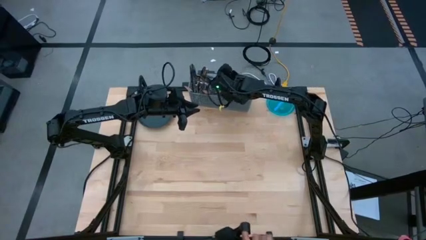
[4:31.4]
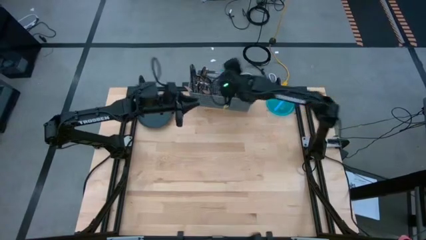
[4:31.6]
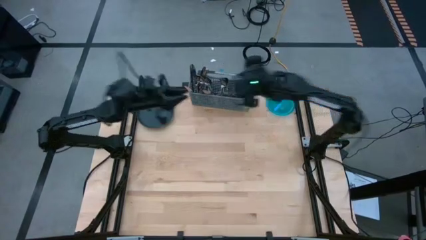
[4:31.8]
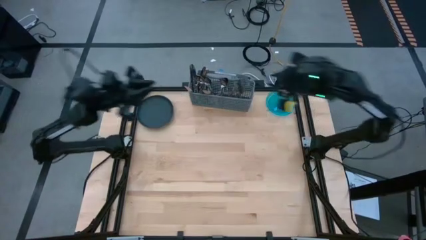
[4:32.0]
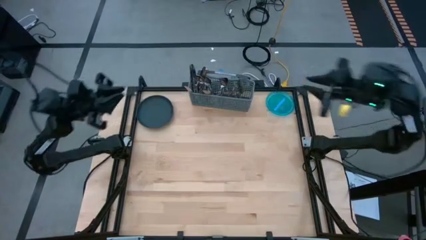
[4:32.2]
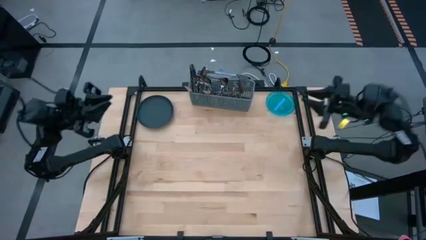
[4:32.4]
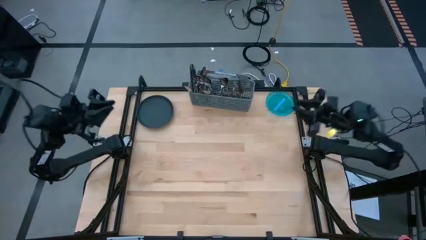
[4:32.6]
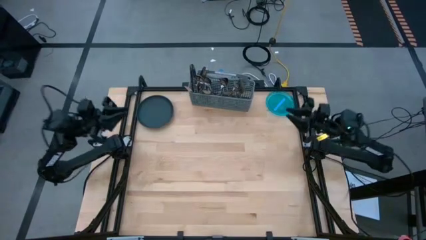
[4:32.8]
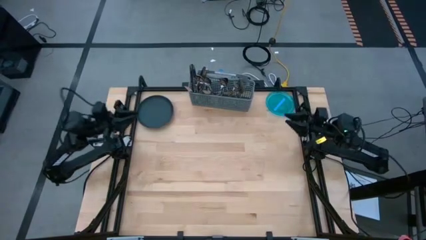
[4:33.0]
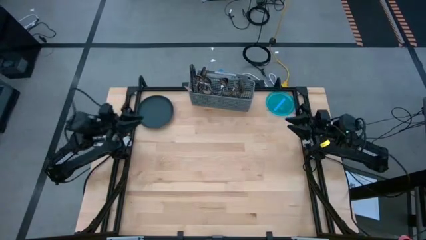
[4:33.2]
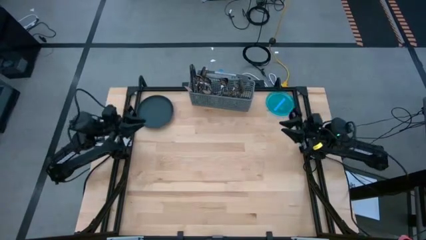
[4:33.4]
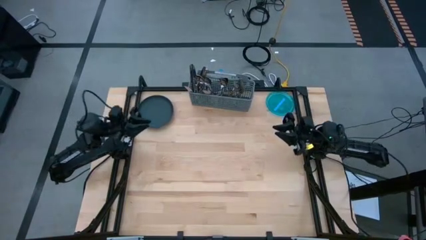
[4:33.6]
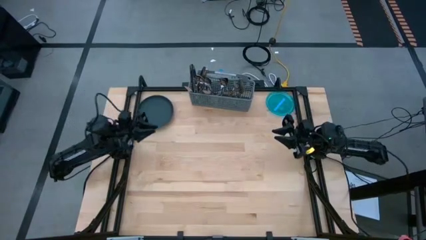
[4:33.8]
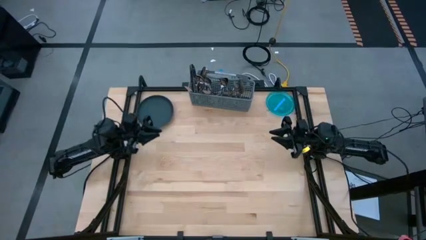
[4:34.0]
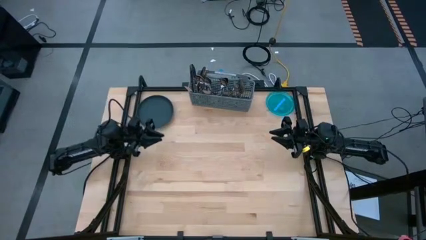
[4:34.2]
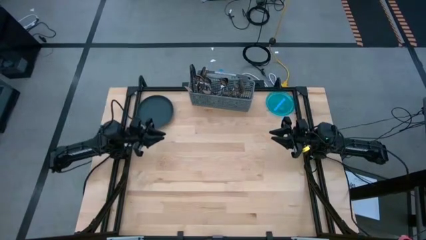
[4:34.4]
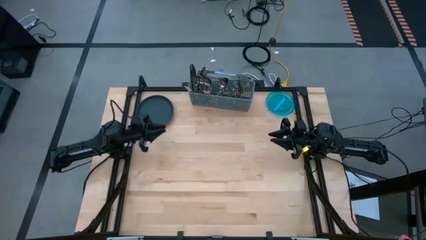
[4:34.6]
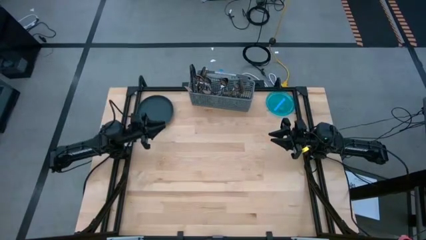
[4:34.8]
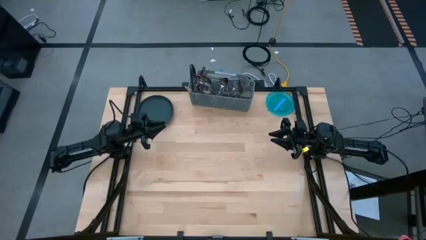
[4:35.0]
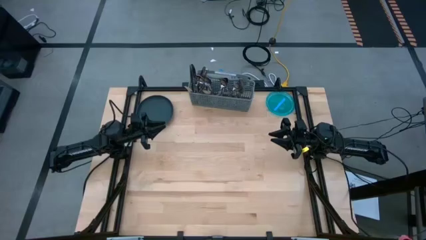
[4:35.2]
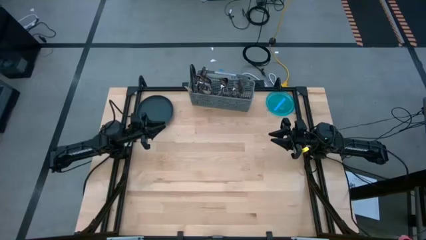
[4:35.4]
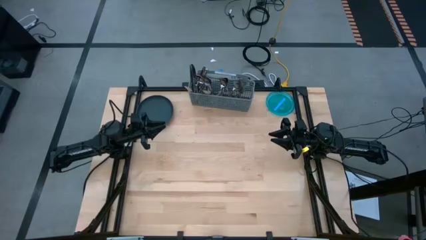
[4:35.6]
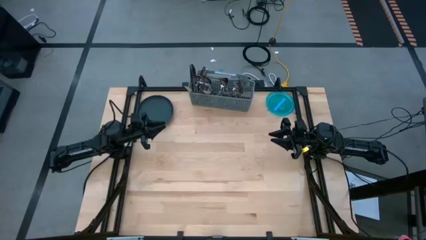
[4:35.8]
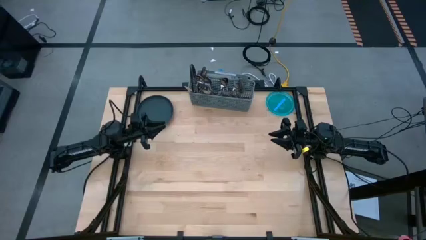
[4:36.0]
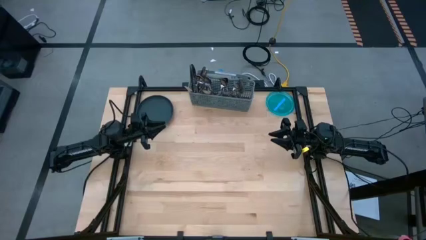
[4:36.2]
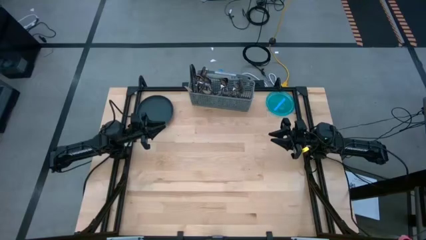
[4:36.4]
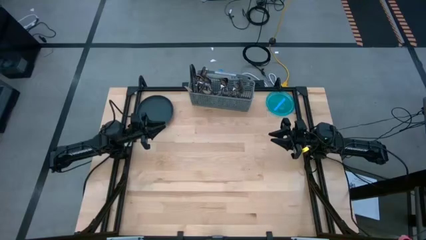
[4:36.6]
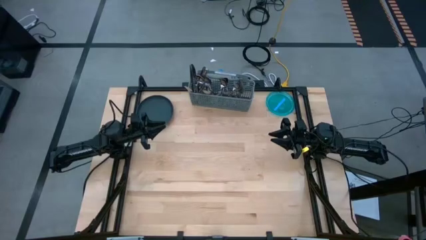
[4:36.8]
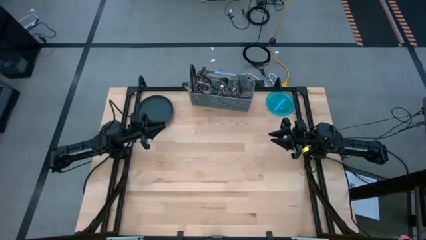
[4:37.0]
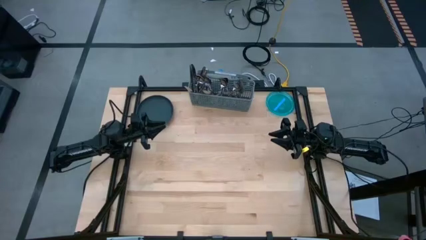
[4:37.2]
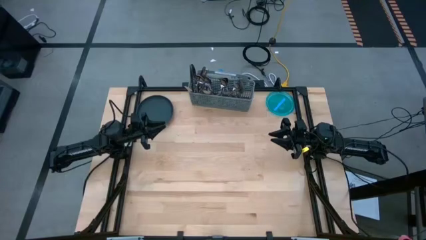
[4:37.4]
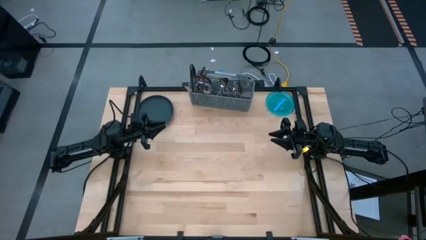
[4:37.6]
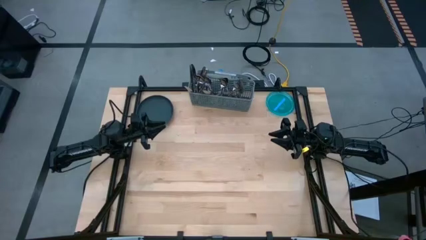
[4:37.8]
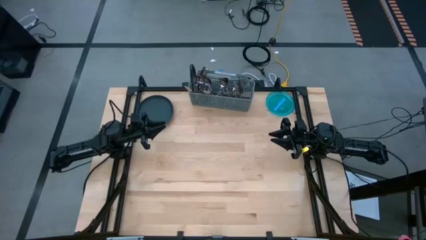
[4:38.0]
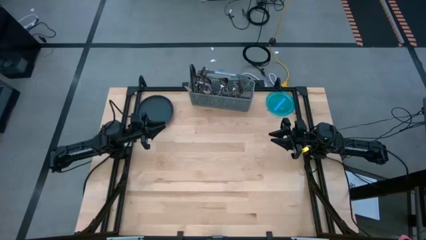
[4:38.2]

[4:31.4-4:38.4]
Task: Sort silverware
Return to Home Position
